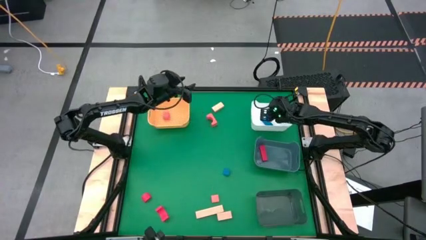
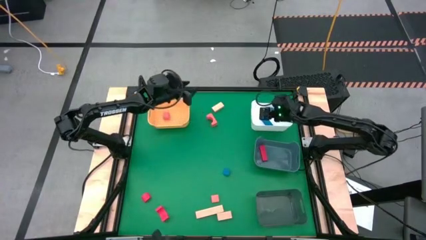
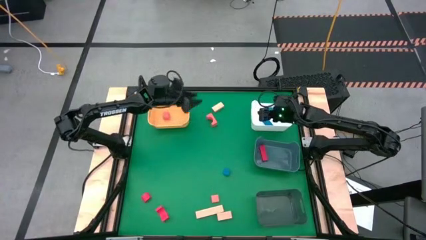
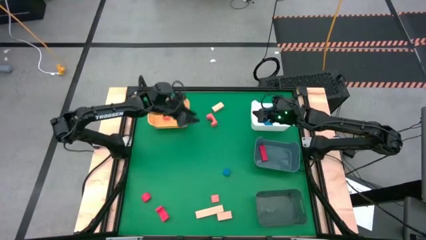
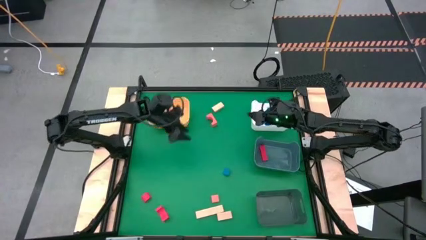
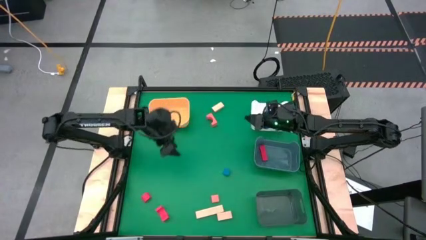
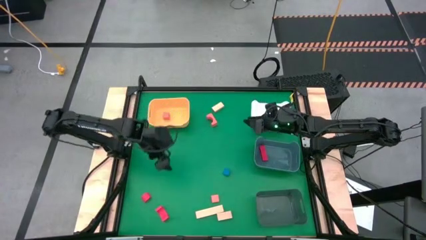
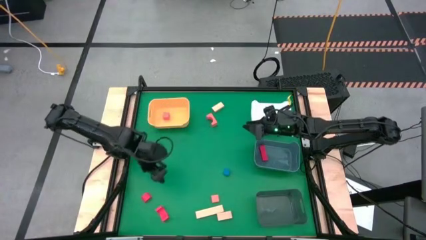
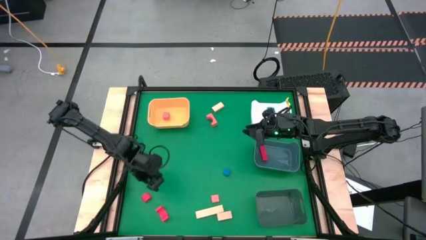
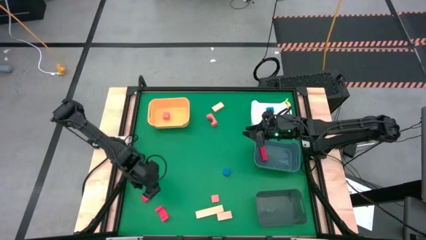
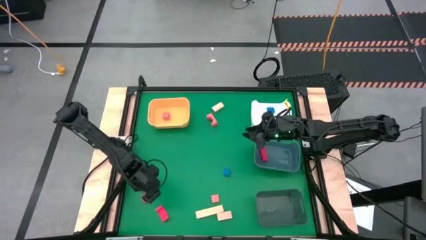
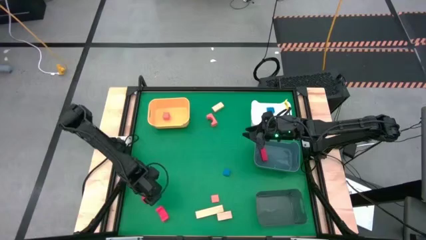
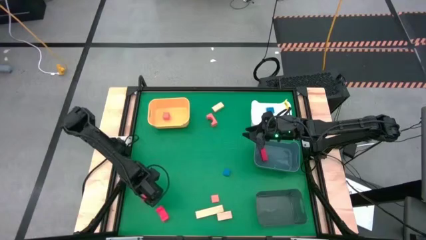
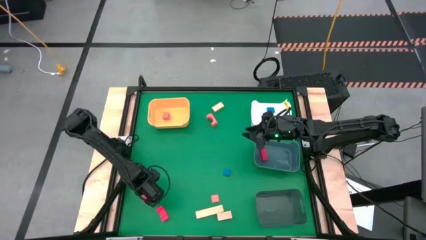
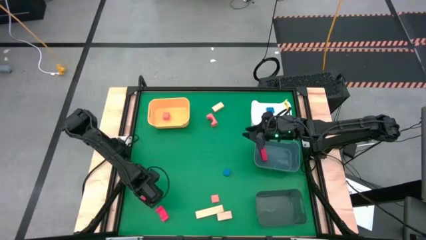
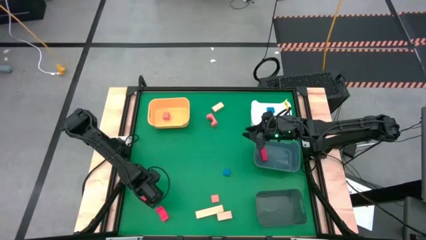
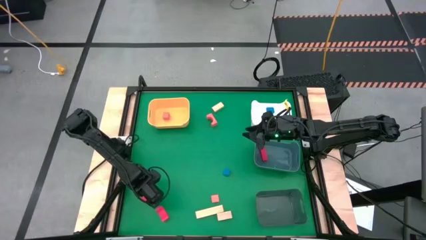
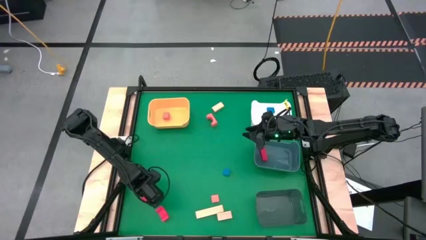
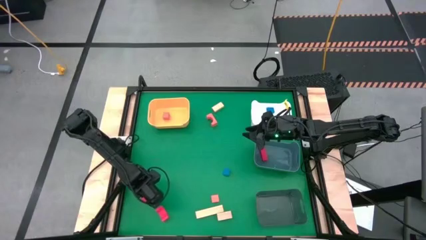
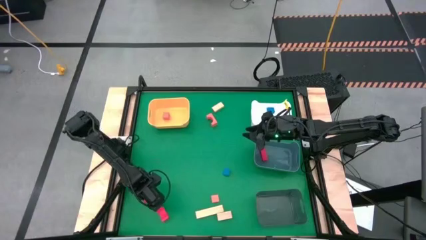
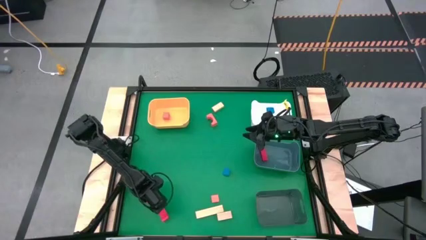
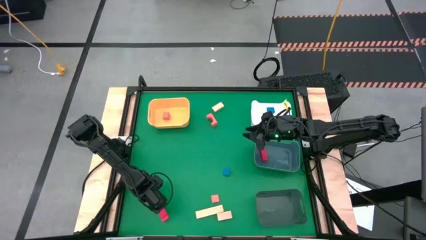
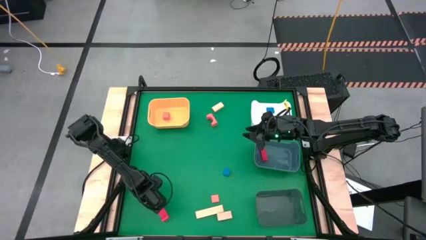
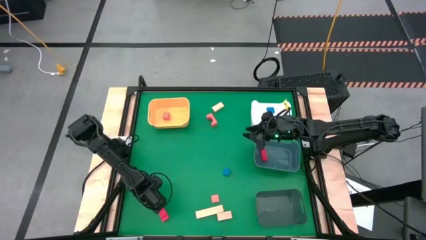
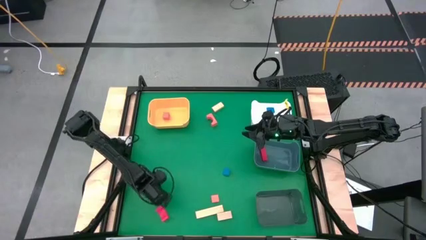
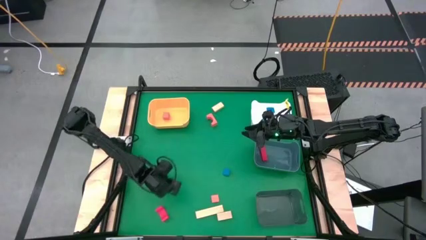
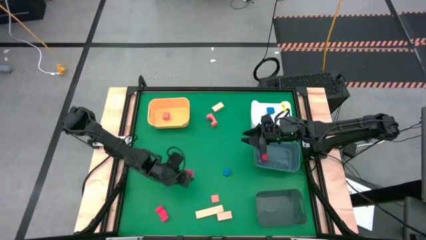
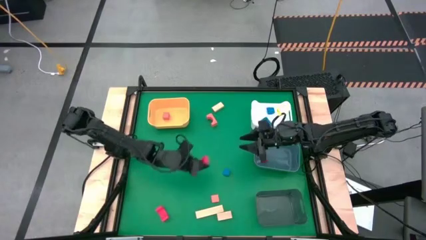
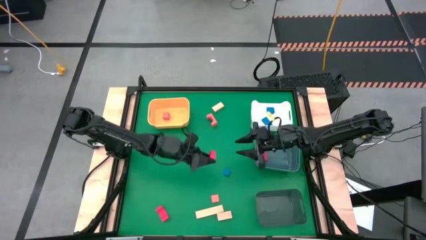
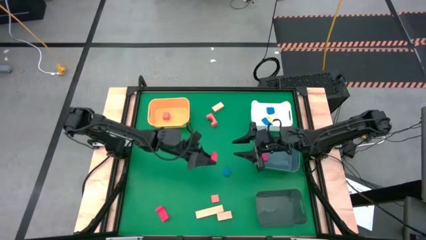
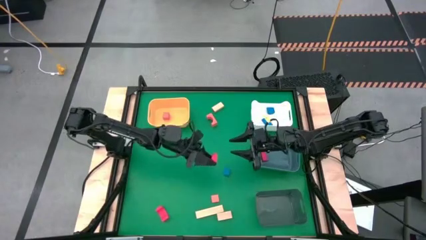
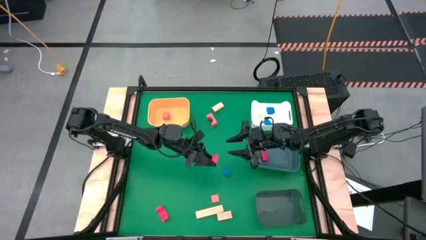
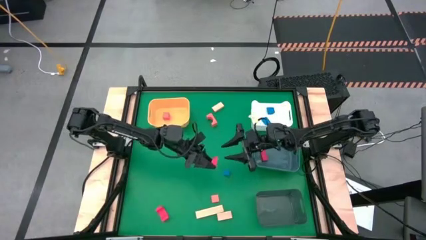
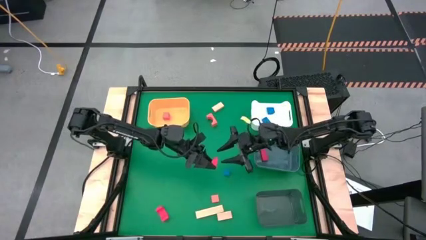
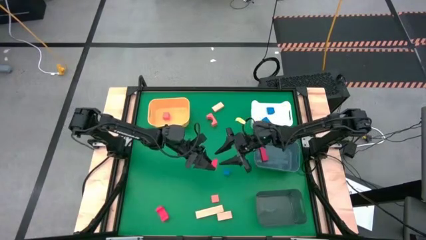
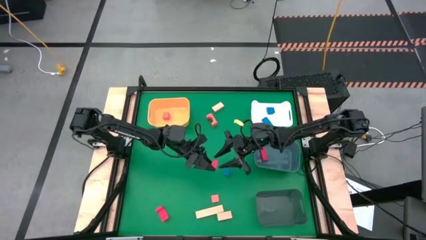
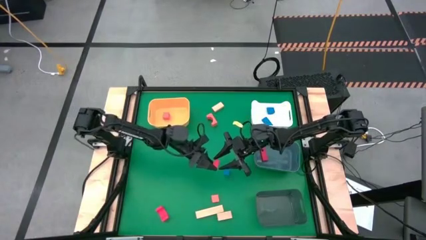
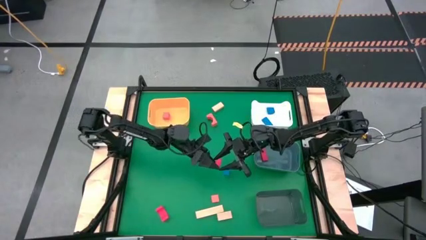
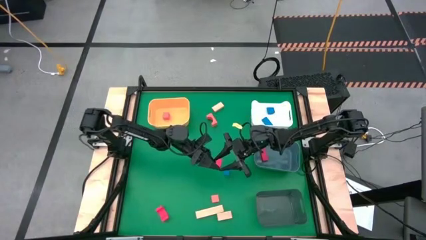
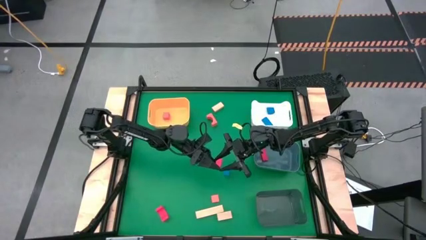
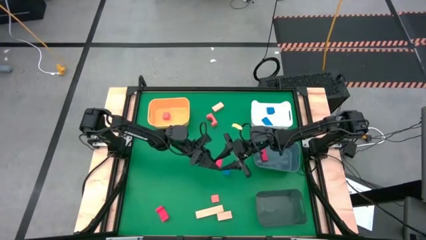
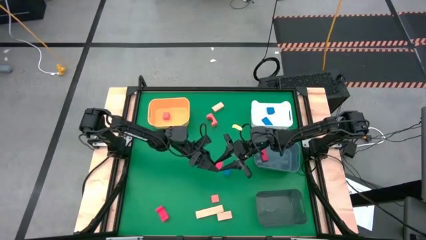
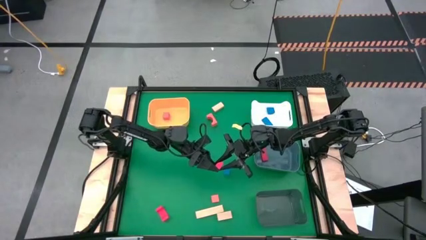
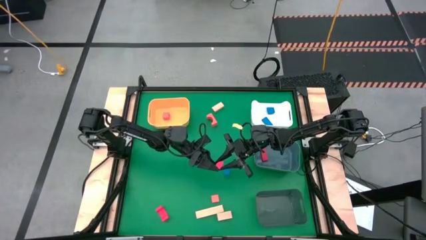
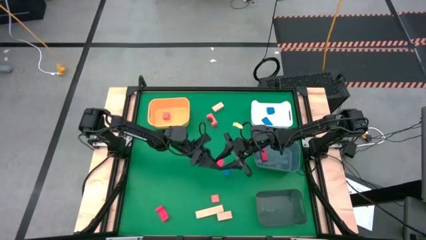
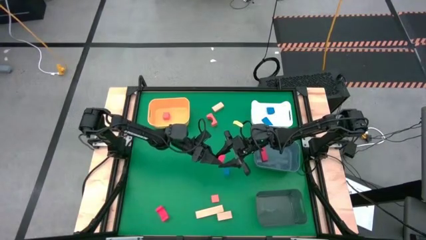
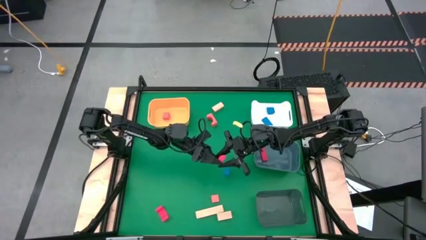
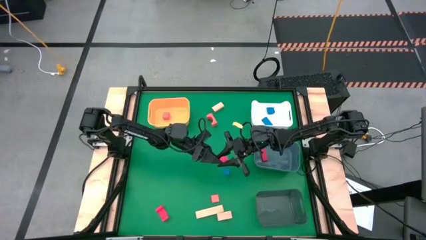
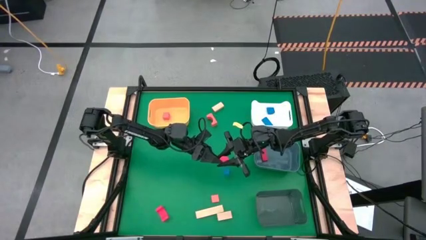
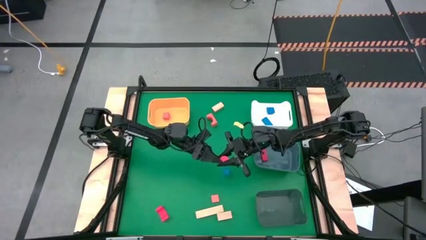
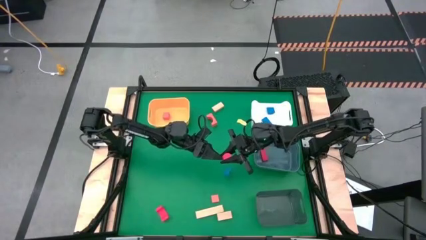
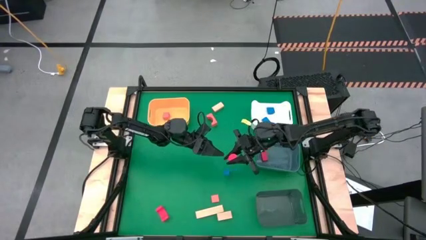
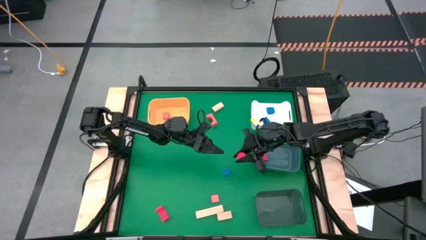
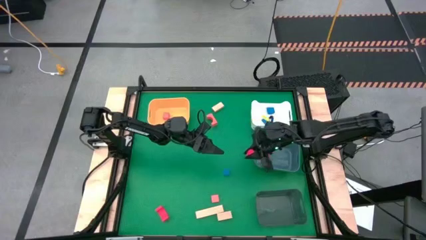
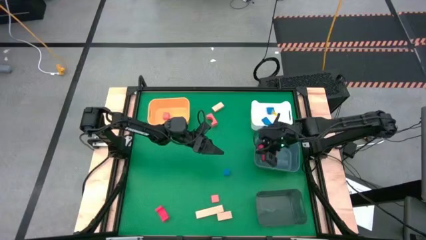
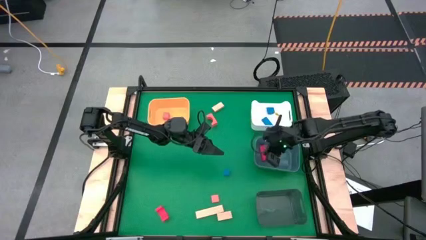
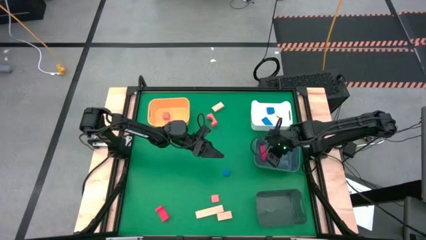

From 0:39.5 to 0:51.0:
Task: Sort & place blocks by color
Put the top red block into the blue bin

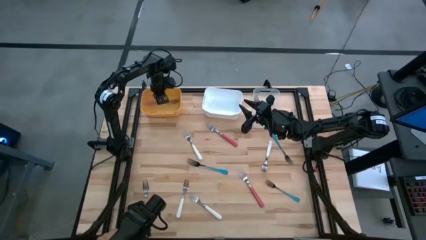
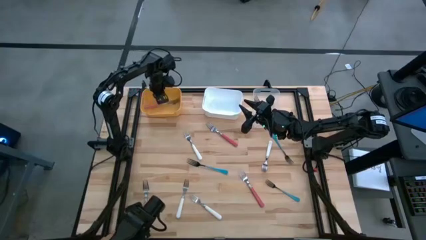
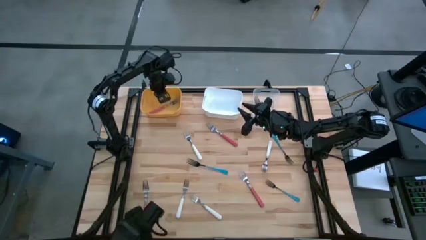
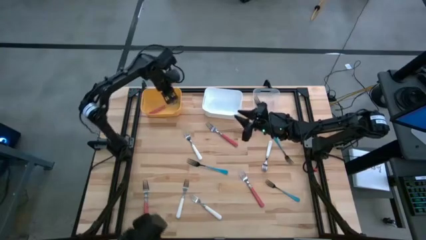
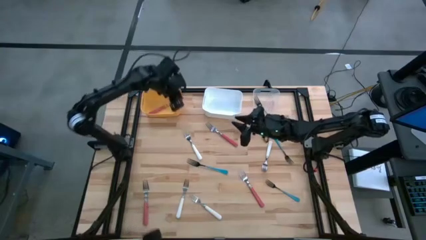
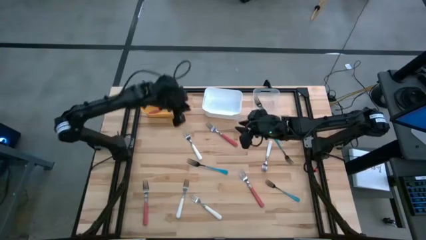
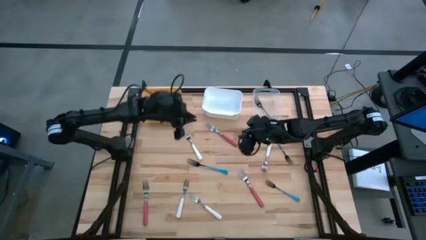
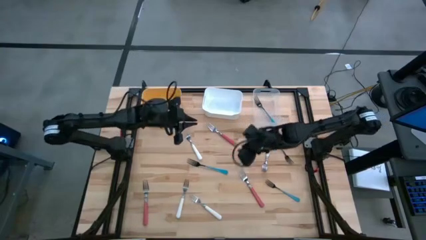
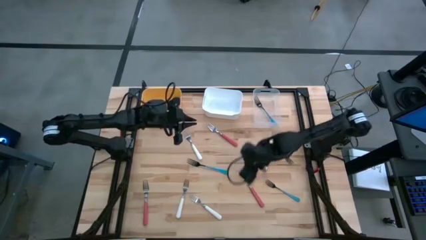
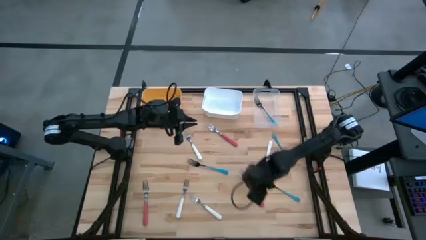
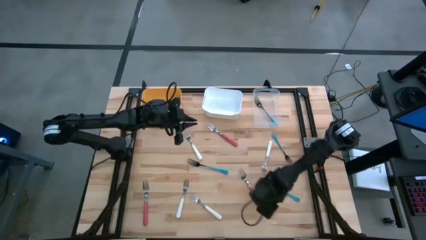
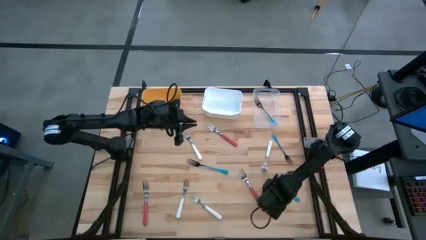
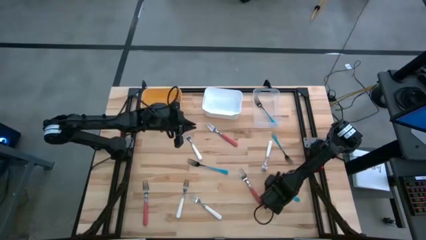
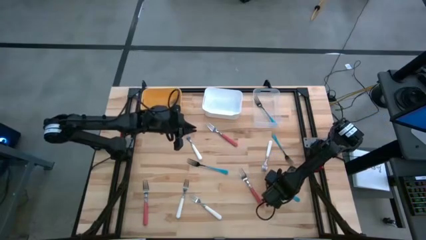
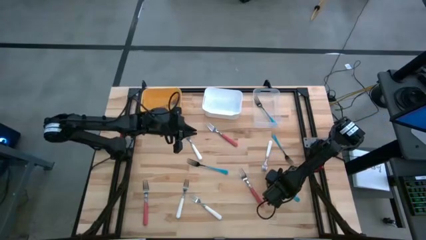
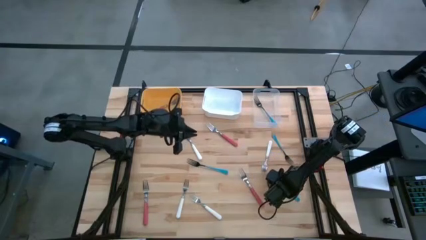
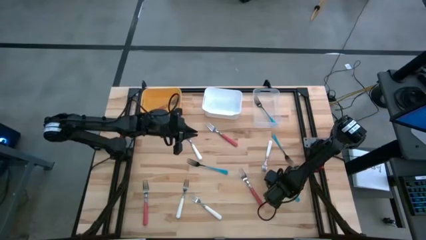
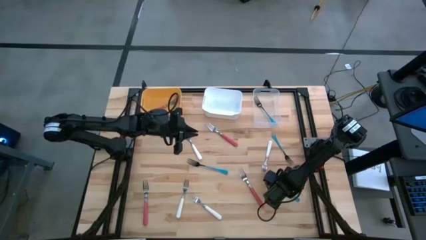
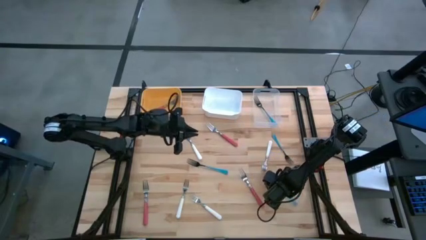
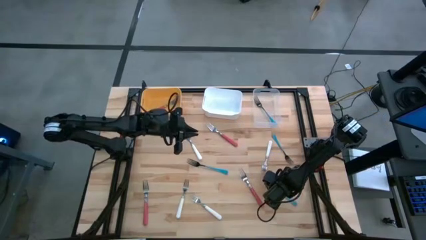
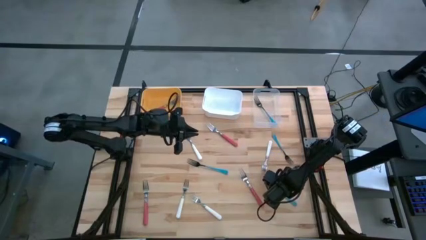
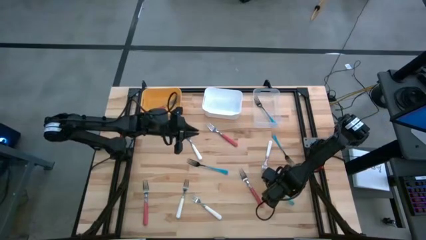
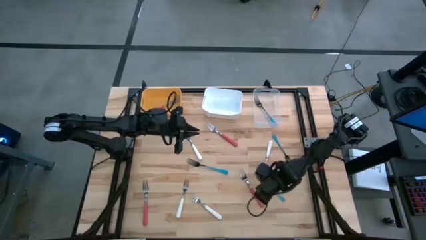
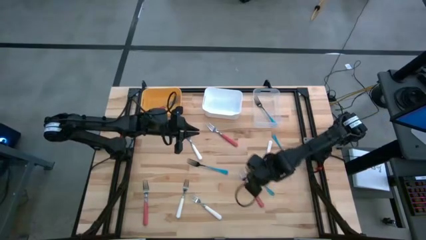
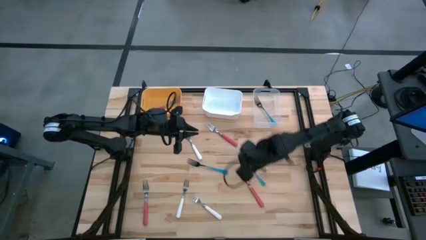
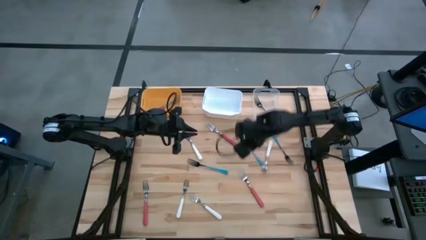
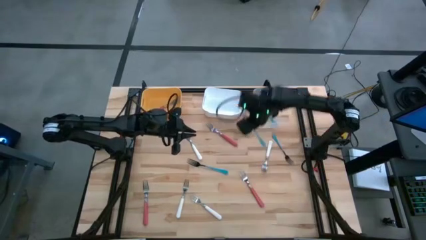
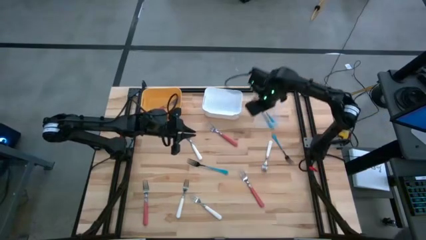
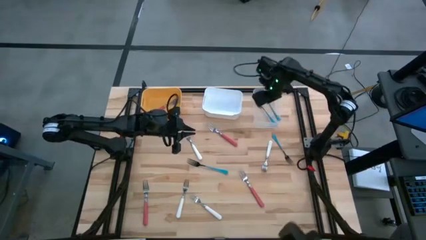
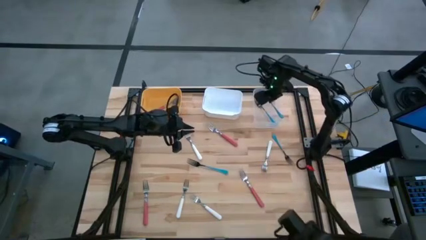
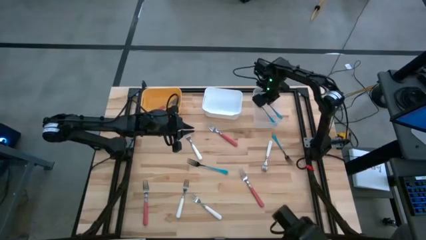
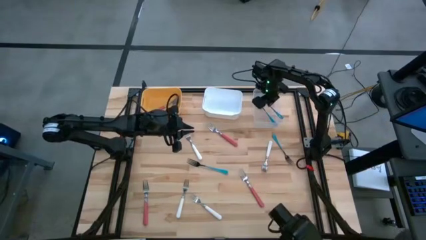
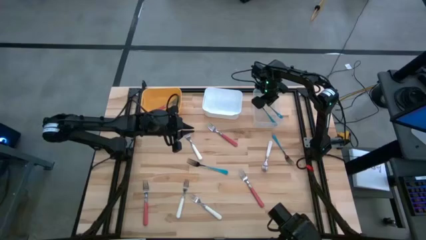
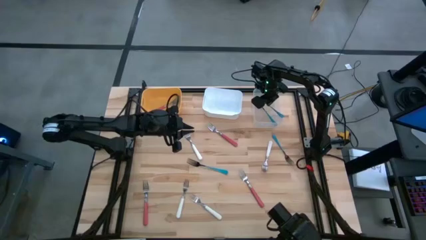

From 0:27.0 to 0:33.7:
Task: Sort silverware by color (type)
Put the blue fork into the transparent bin
